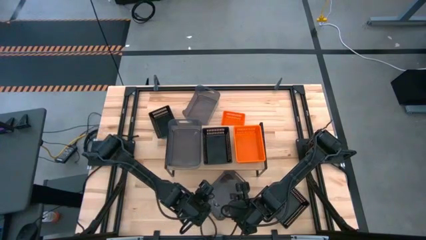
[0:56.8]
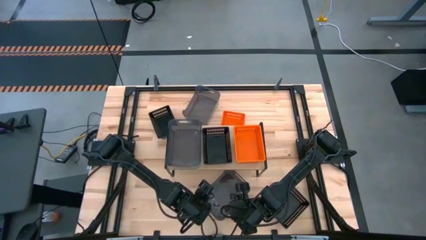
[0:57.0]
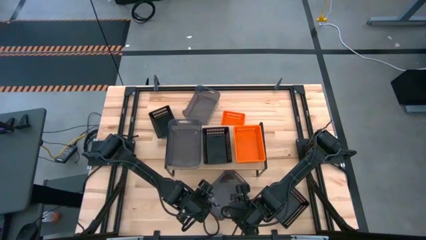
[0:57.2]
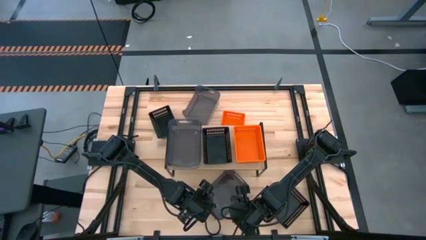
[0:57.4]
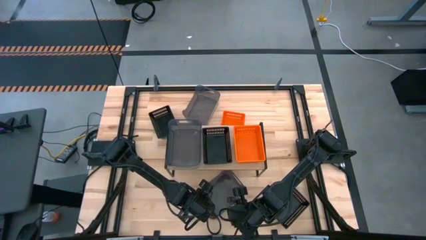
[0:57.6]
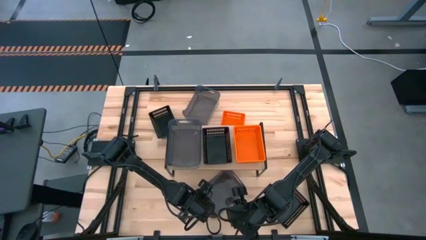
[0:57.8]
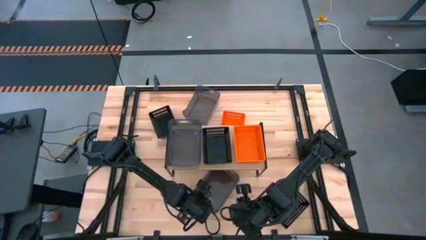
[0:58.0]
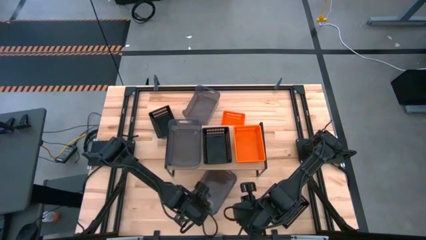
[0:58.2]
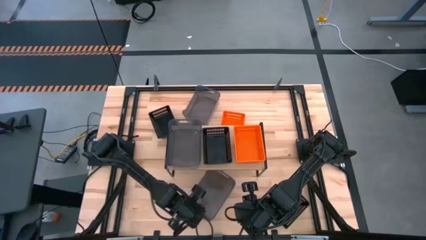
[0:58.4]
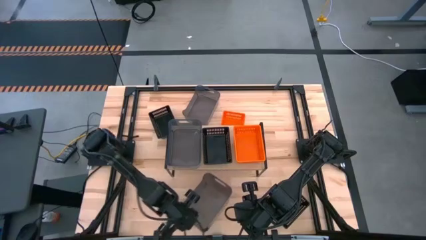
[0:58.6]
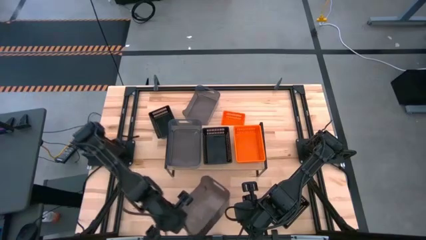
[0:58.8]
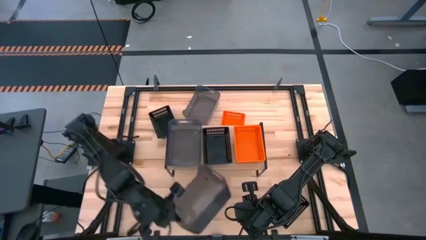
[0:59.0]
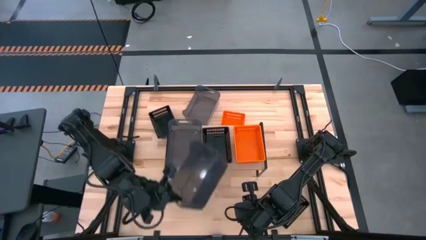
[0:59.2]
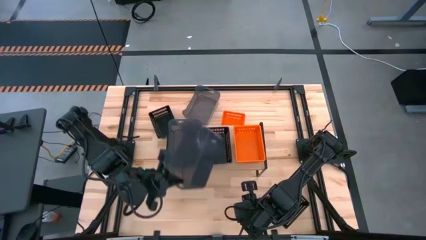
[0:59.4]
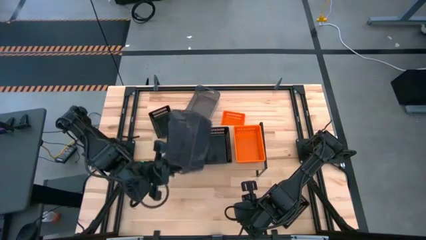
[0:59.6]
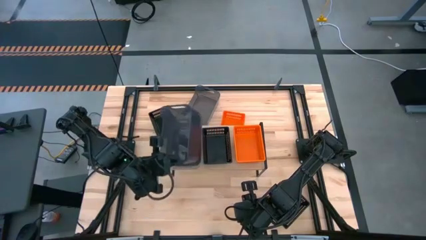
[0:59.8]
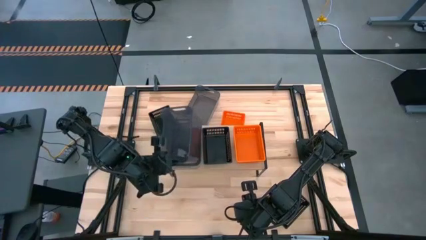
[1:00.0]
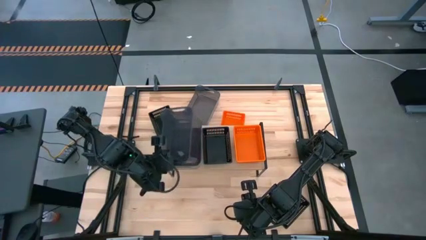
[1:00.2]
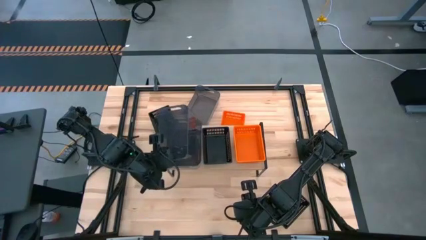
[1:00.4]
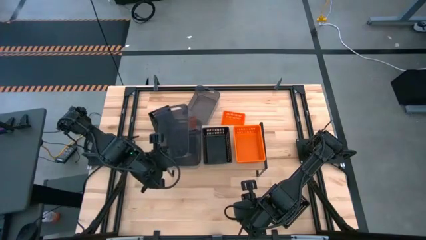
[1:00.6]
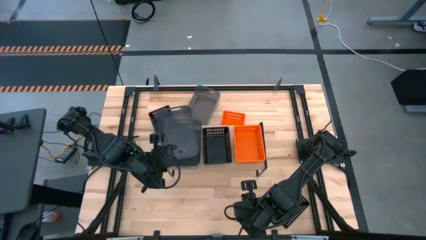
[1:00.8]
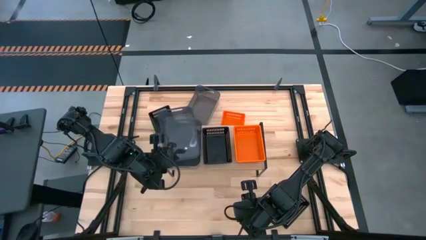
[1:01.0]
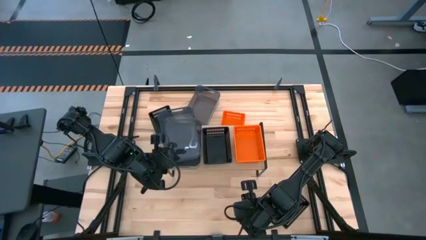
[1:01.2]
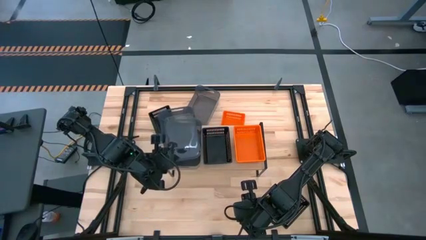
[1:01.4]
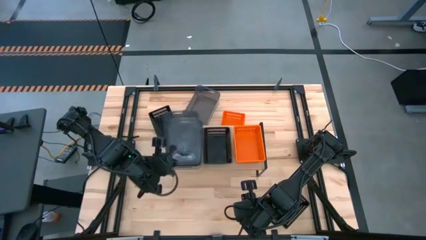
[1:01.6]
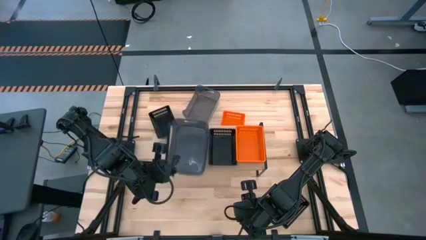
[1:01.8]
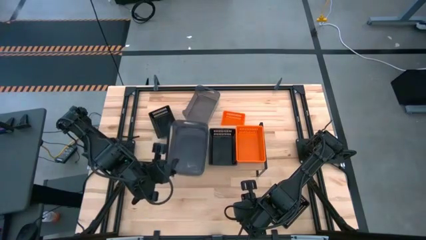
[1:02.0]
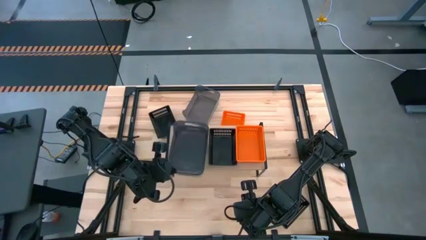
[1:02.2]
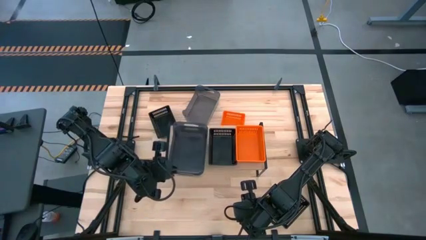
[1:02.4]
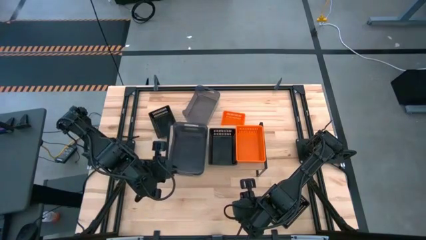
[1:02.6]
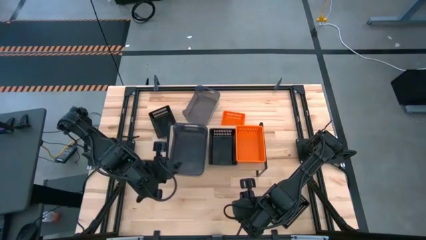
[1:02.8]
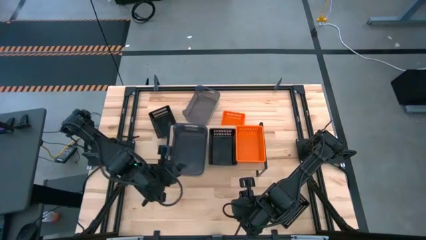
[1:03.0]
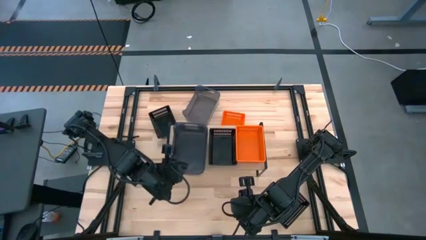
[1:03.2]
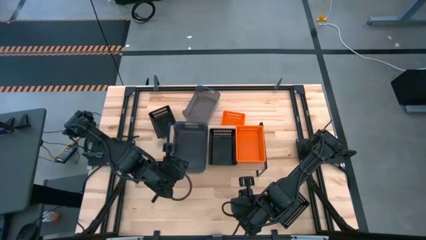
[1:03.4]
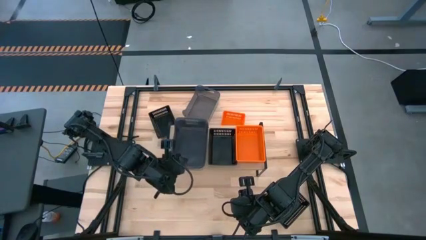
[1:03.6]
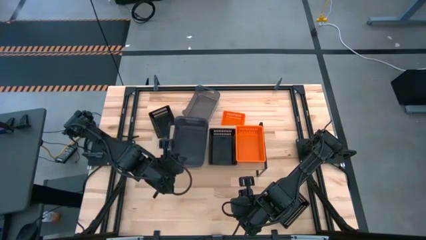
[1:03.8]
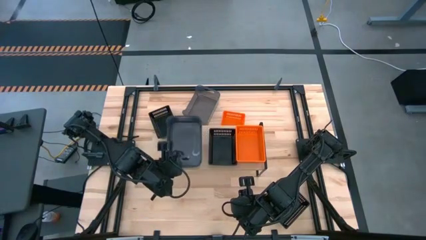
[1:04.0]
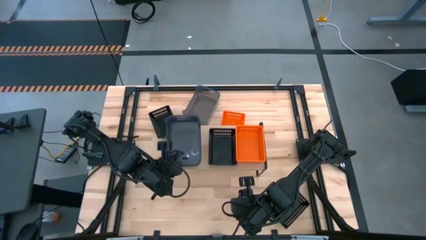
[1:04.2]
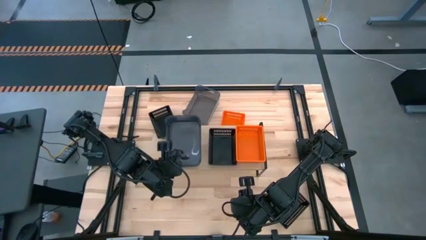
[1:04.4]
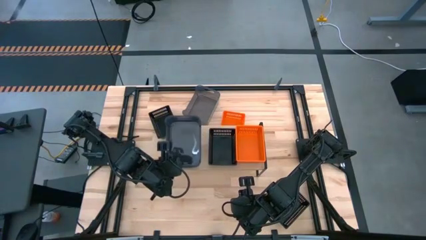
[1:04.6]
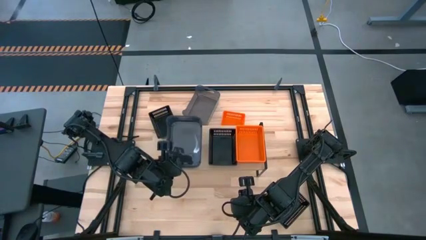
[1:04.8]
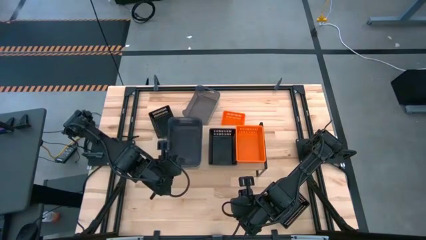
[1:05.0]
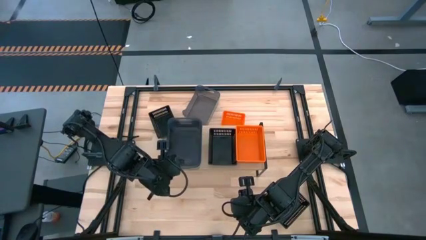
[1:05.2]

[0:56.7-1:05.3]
Task: Stack baskets on shelf by color
Stack the bottom transparent black bin on top of the transparent black bin on the shelf

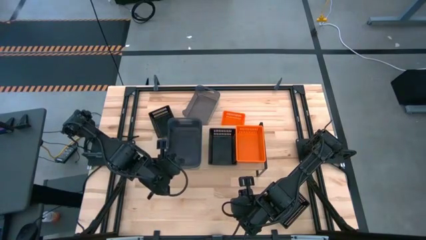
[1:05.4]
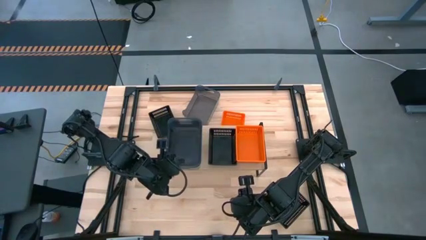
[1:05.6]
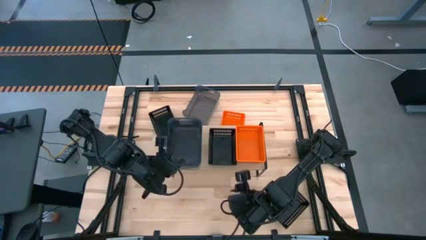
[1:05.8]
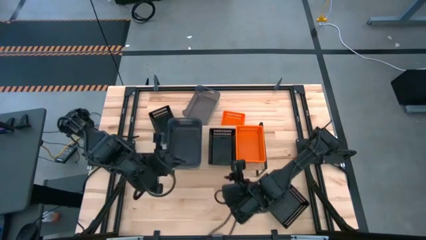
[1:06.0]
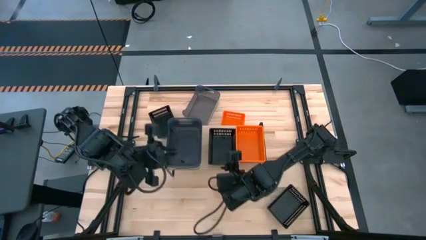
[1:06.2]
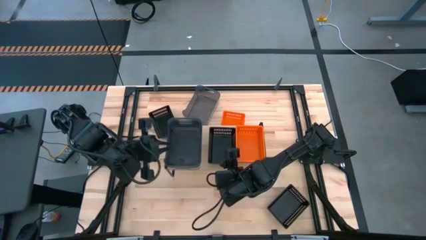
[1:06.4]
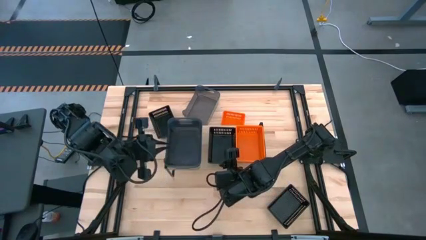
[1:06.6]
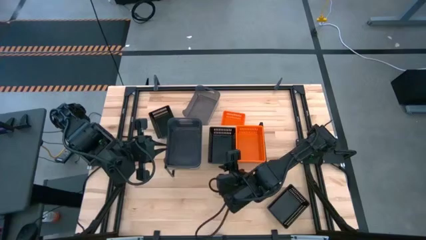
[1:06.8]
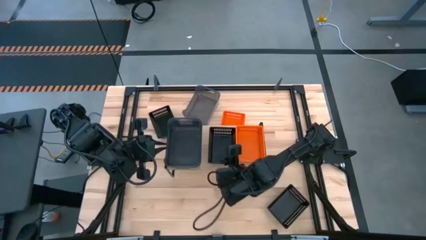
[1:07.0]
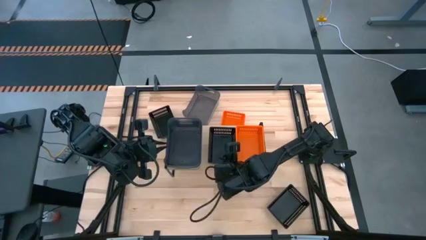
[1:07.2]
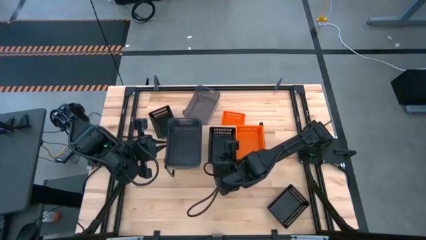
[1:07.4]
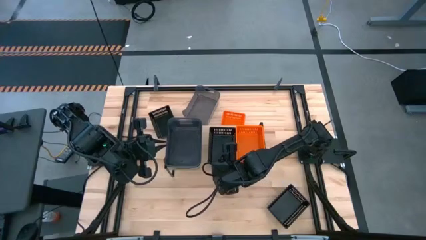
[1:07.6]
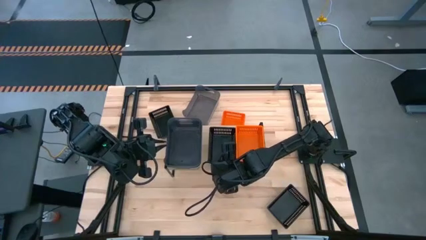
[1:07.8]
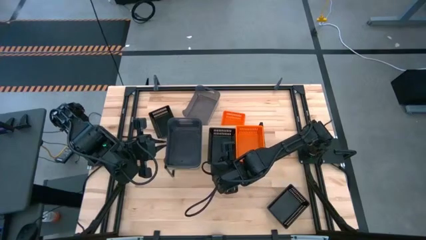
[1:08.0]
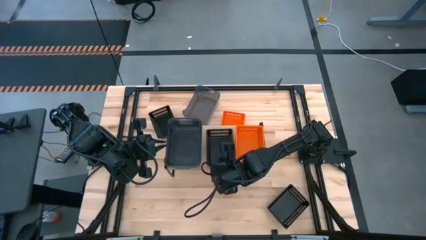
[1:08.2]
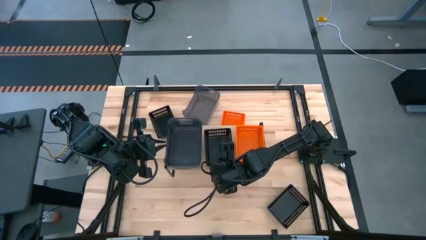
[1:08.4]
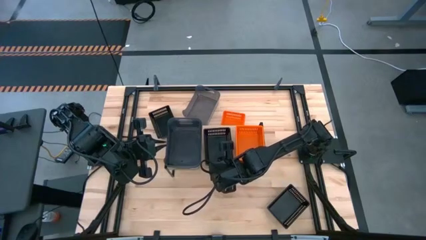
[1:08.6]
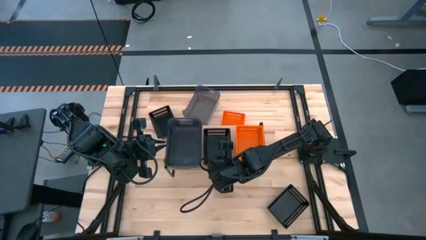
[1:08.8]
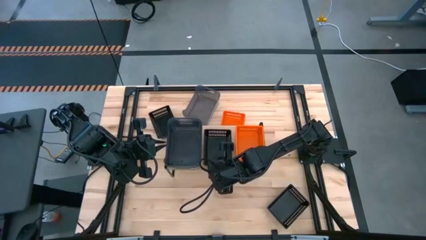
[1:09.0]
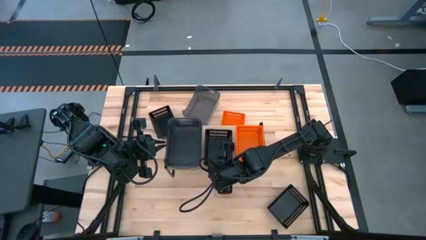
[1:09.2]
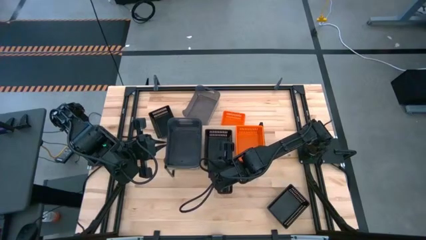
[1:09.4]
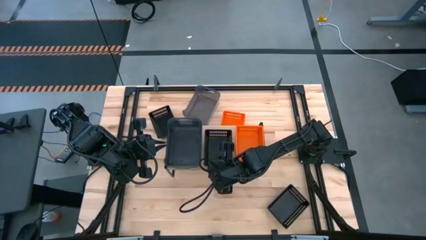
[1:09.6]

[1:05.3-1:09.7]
Adjust the black bin on the shelf

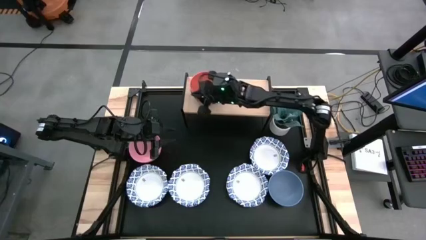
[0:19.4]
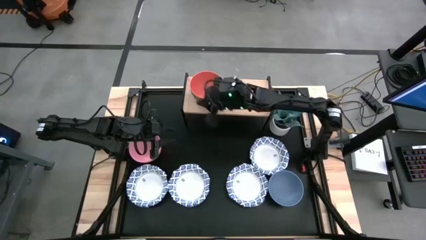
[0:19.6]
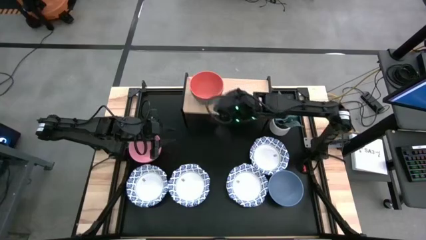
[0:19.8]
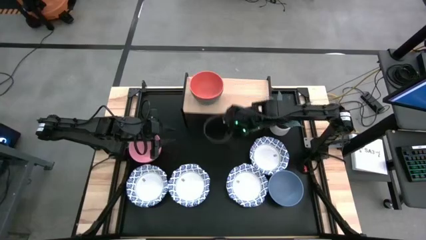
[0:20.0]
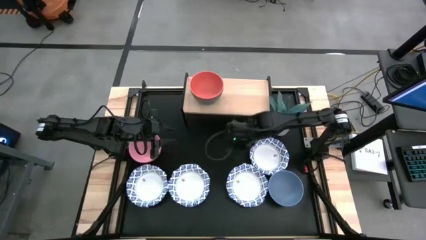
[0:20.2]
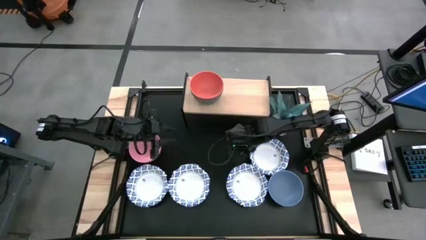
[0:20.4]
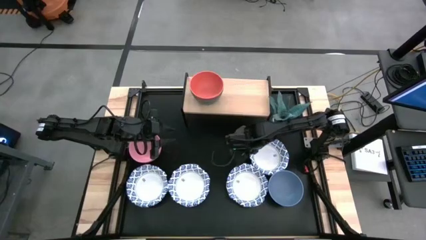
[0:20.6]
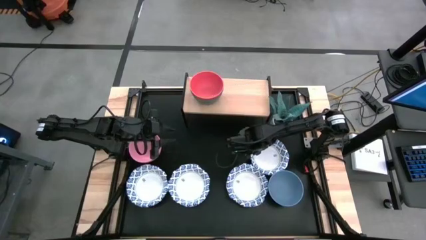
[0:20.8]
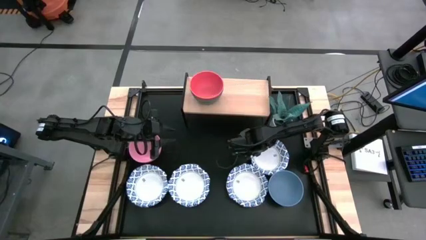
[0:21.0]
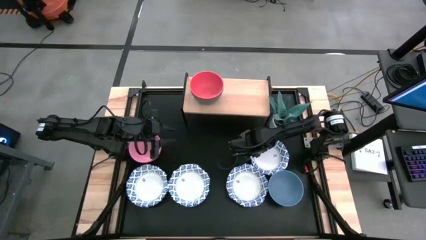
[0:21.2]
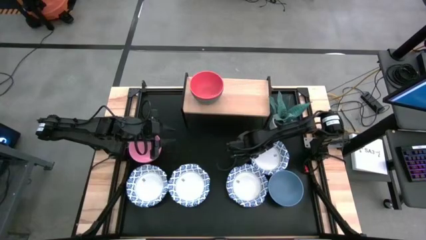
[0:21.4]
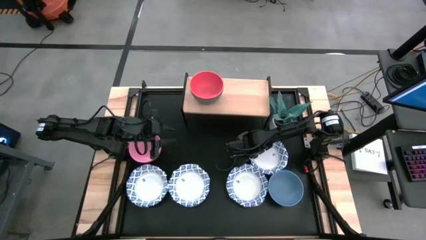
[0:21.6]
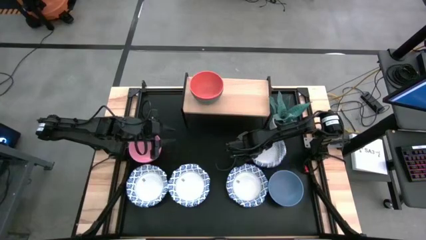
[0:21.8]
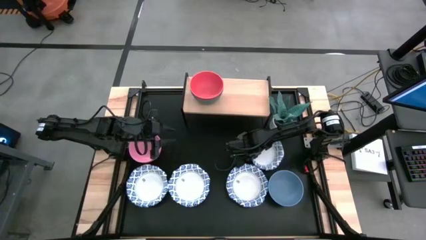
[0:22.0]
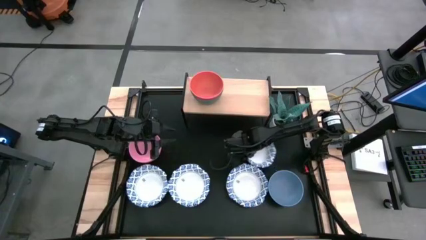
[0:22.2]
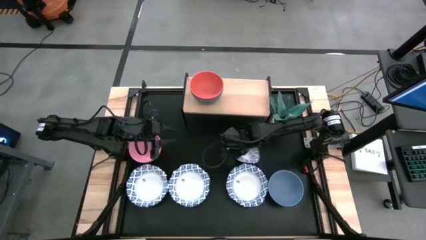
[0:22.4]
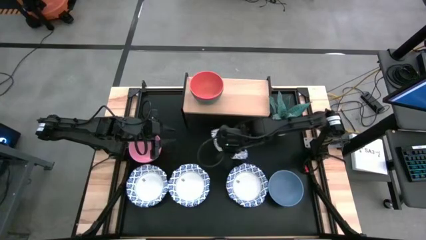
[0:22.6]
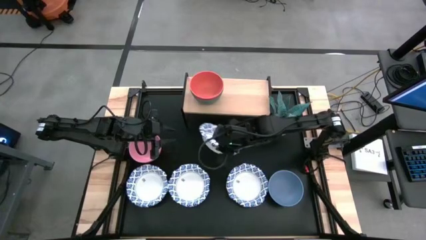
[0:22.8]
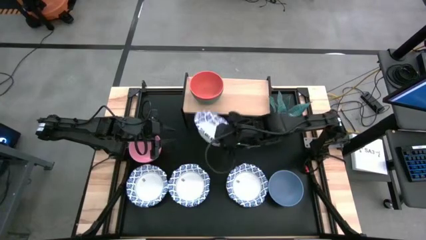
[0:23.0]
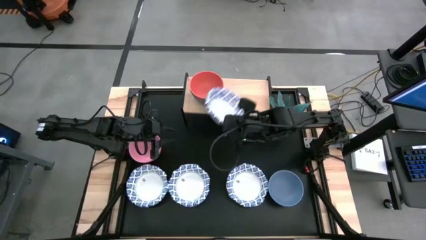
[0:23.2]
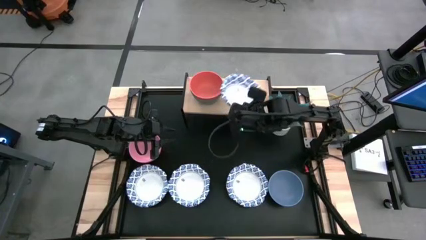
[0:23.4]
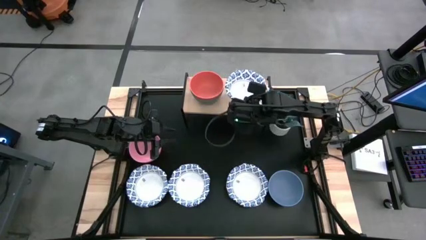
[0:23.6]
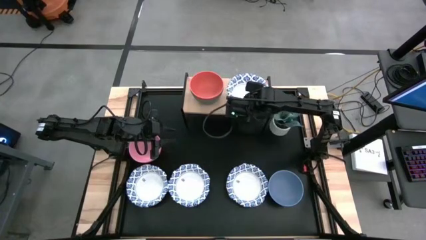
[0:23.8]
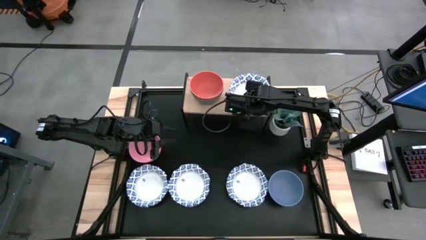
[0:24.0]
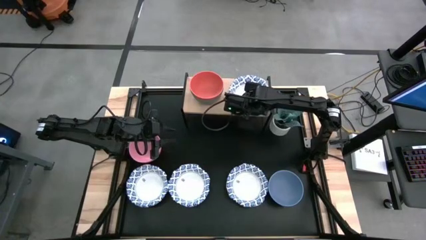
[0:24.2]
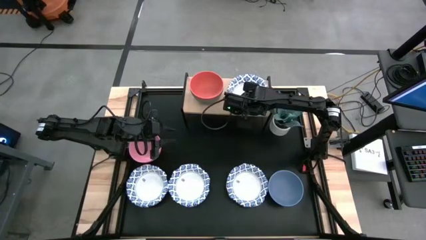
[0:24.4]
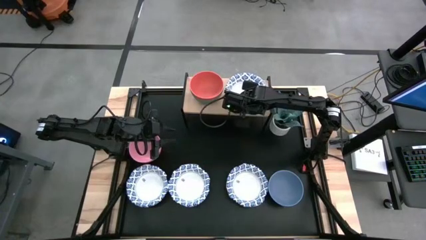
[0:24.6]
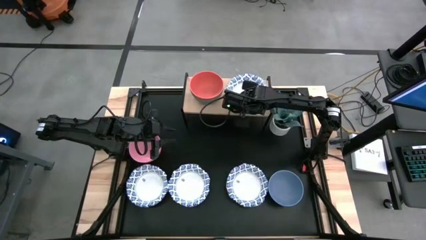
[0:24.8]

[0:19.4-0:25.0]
Task: Place and stack bowls onto a shelf
Put the white with blue patterned bowl on the shelf
